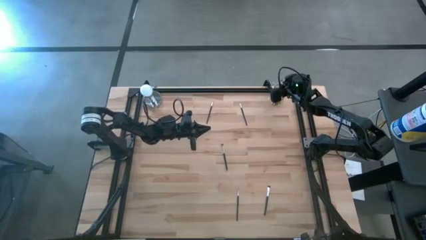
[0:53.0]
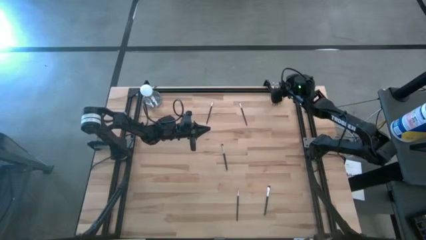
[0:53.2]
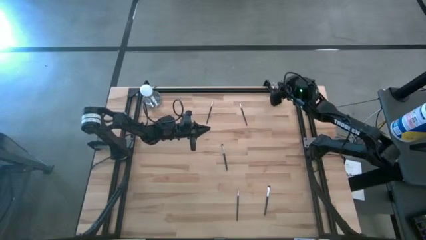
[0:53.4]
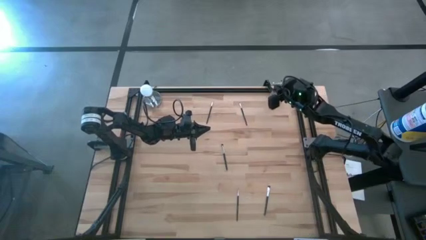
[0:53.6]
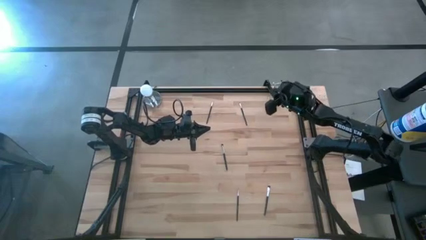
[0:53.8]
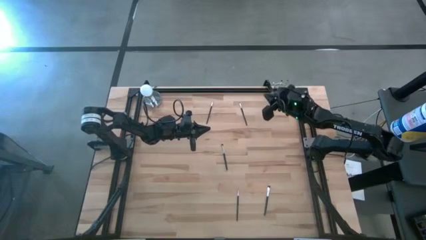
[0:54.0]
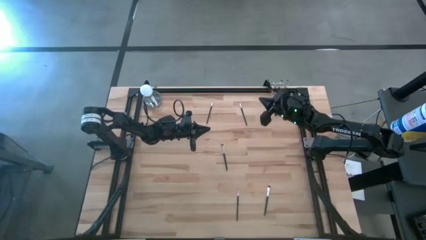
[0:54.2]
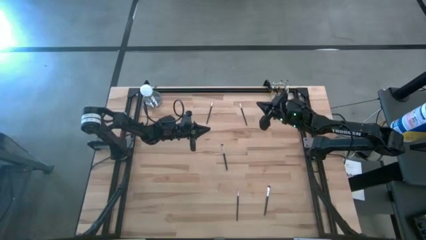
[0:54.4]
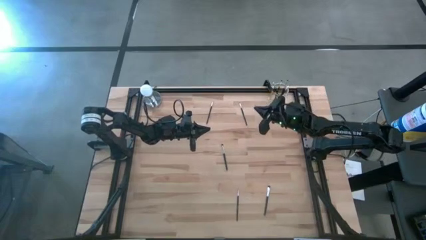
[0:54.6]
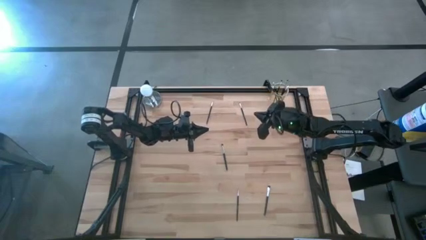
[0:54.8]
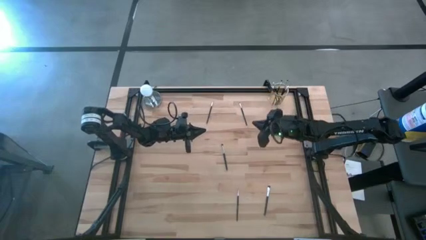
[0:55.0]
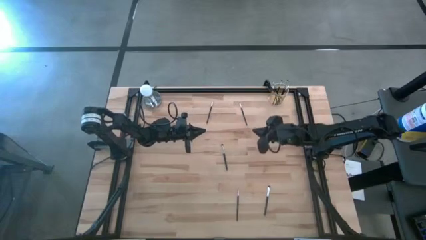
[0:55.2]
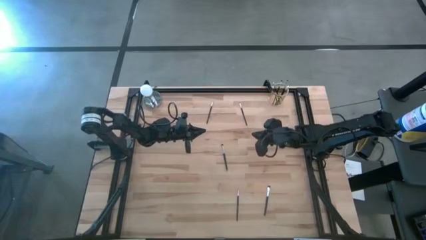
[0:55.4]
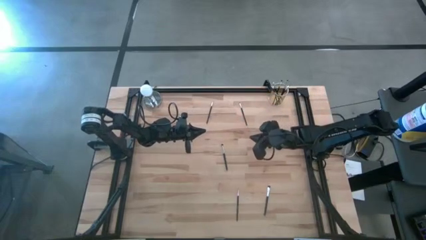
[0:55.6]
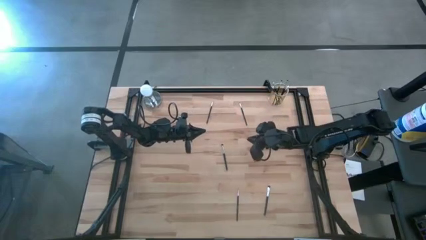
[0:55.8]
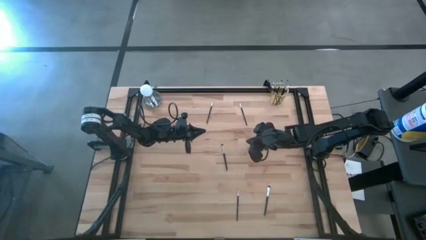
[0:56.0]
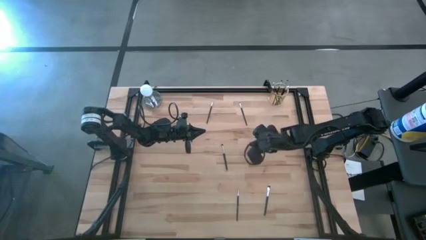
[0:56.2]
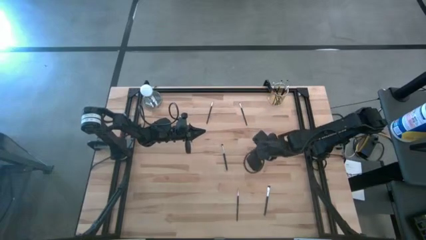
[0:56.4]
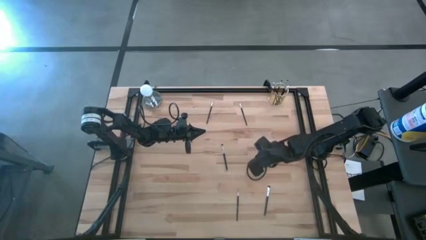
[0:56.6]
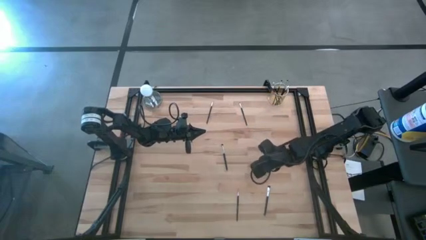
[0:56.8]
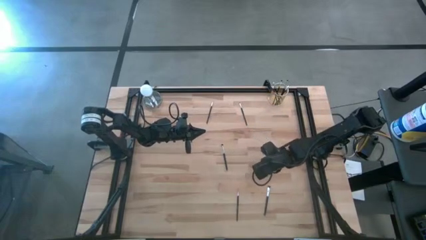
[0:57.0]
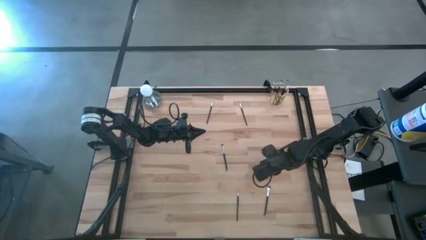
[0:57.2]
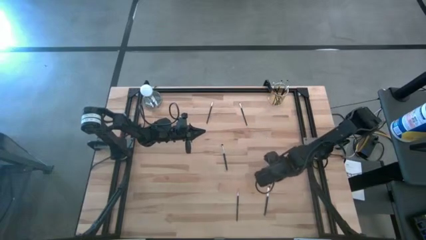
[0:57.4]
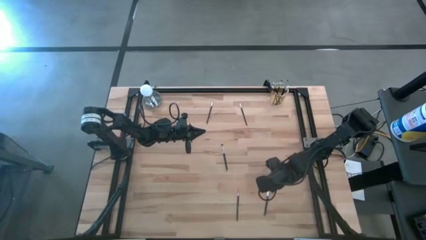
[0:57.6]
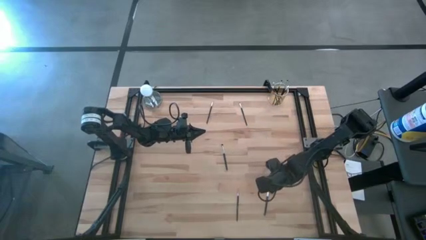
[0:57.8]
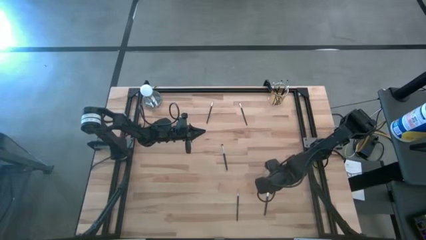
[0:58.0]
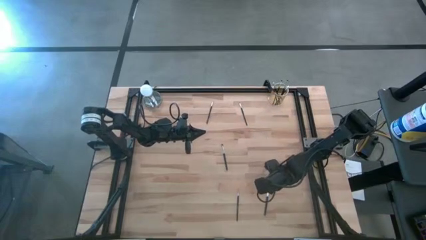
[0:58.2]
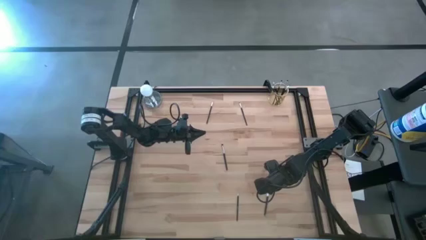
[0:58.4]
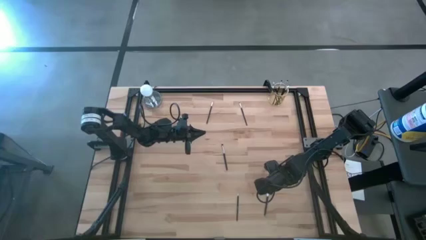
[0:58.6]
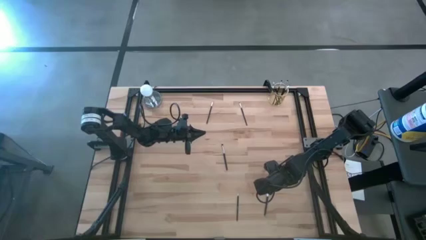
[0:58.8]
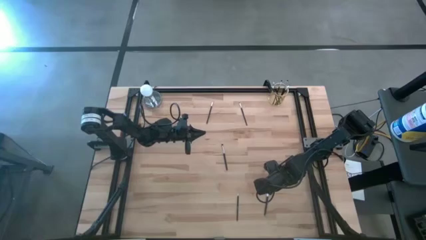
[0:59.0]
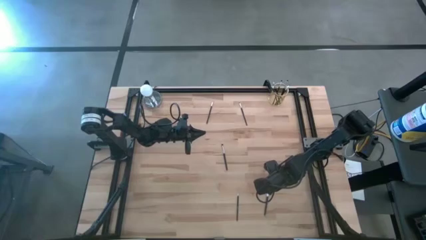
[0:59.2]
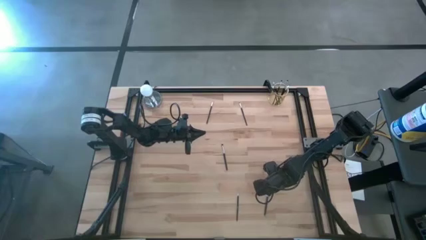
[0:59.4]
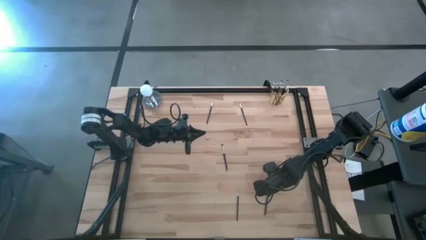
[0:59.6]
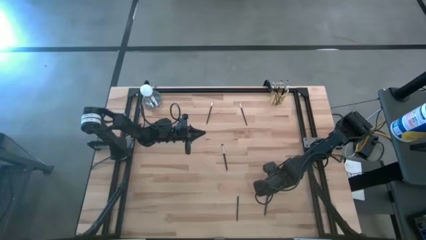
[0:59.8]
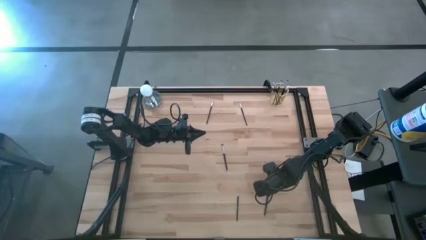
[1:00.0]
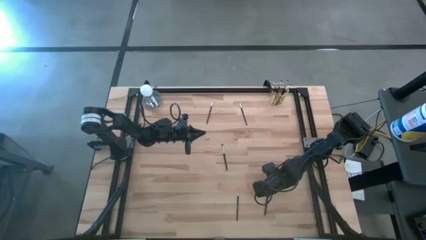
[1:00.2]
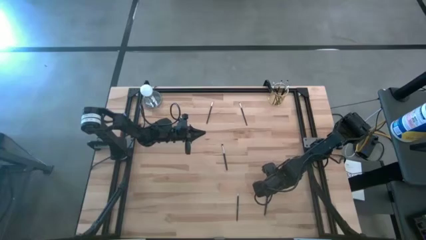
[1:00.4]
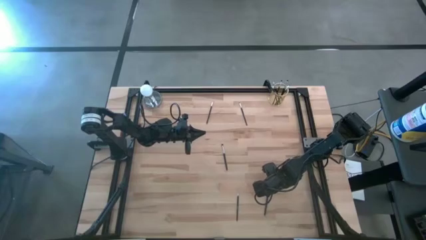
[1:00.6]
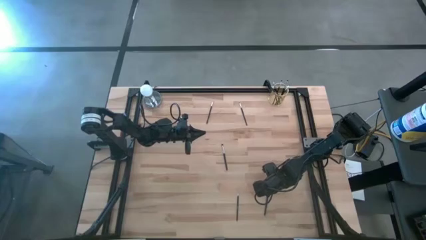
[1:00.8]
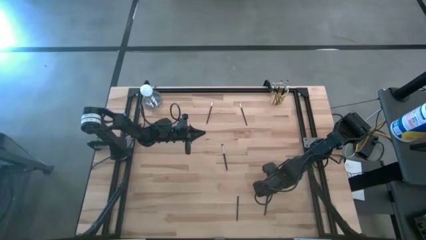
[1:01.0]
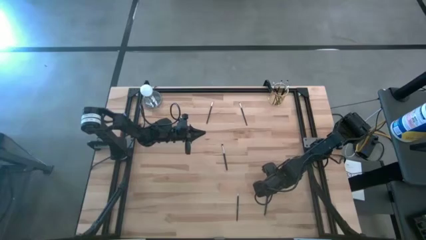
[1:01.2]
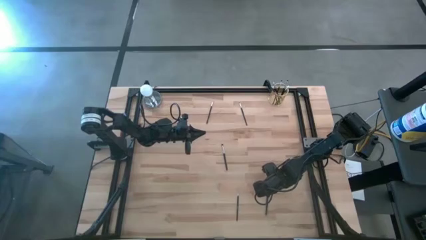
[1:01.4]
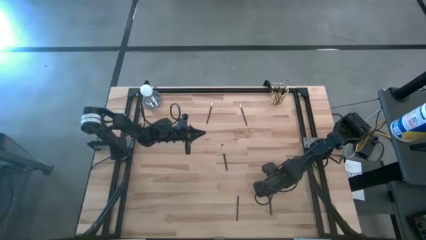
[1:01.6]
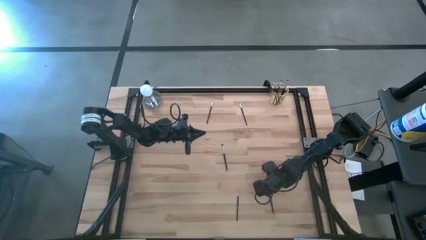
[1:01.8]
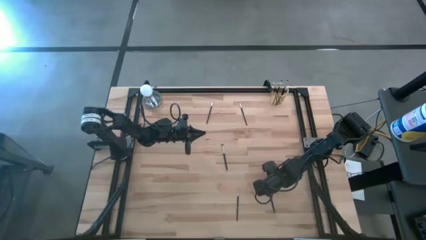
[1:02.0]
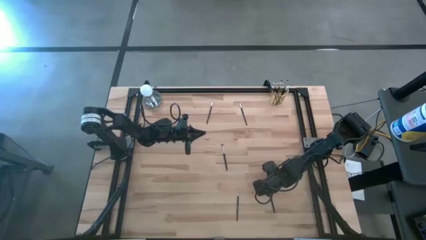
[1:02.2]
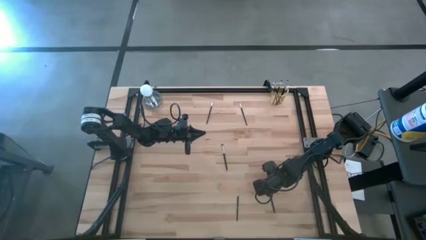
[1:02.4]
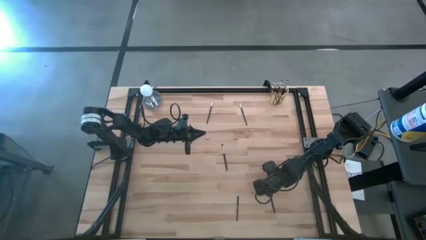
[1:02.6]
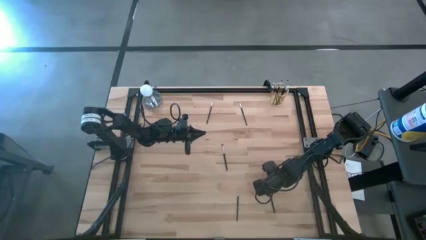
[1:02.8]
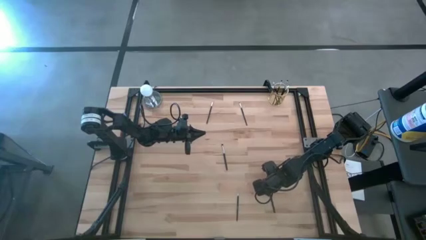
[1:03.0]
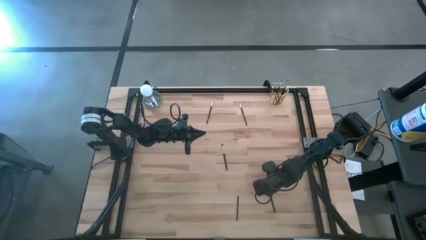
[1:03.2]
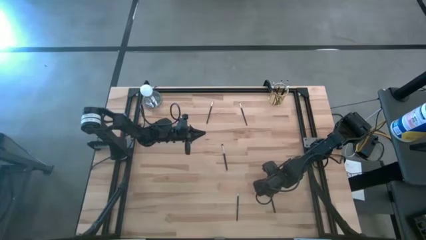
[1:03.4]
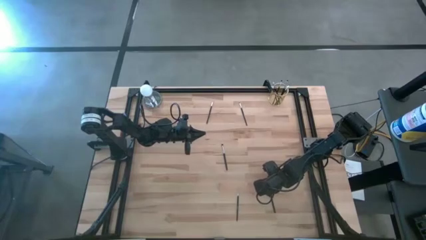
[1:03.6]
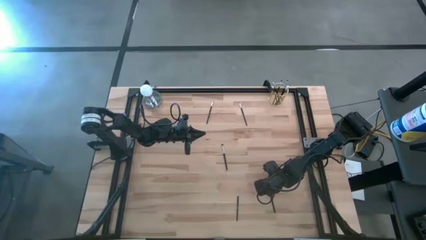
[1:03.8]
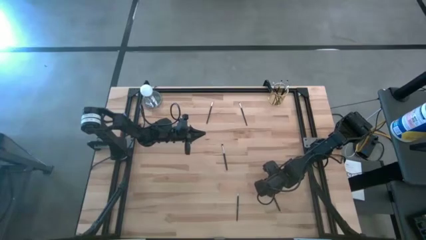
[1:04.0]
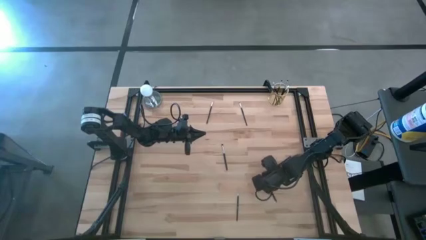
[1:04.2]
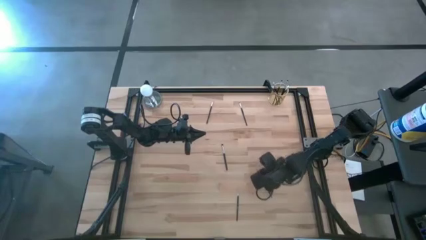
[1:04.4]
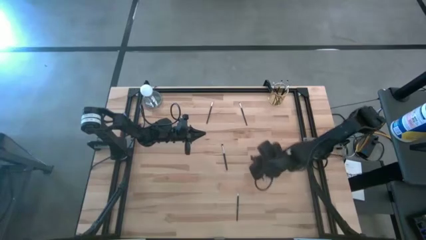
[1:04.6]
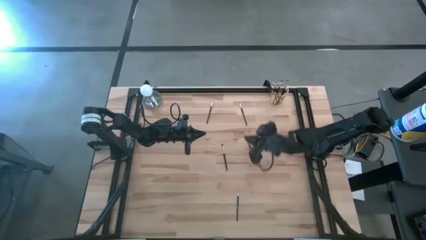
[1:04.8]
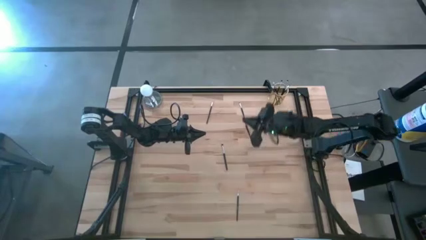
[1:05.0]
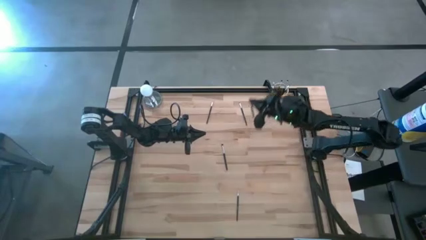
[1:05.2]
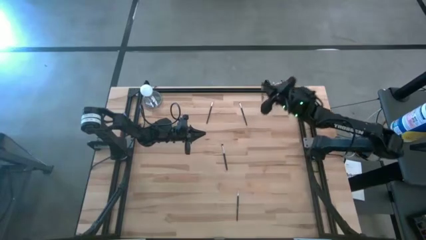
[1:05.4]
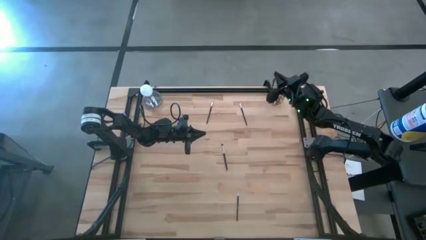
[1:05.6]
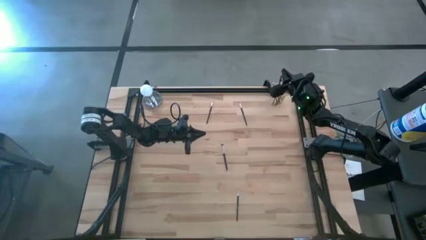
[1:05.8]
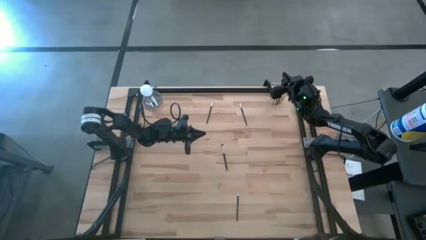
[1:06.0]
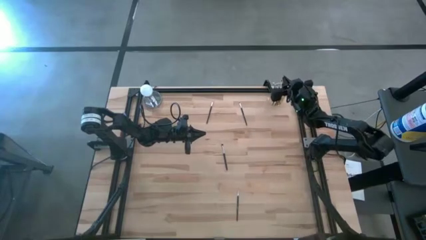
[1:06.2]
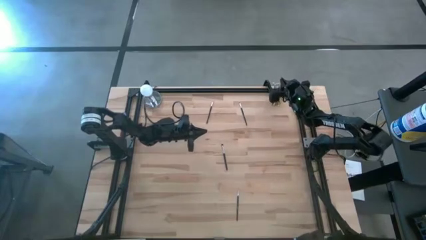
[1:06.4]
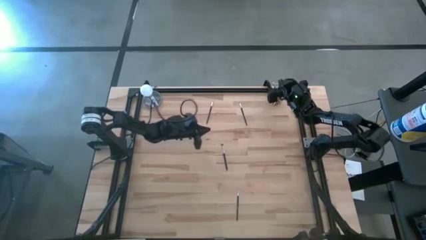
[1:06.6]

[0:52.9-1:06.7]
Task: Sort items
Put the black eyeshadow brush into the gold holder

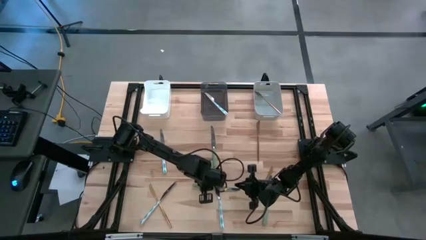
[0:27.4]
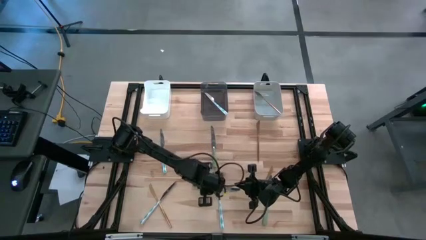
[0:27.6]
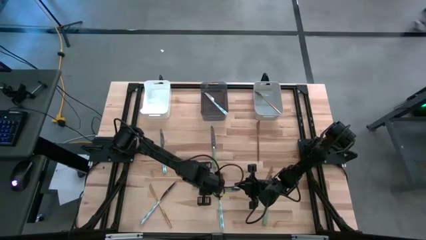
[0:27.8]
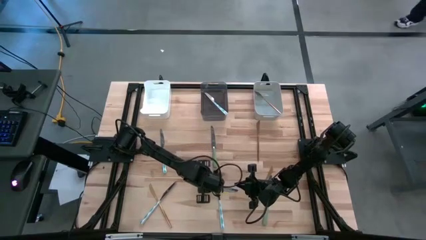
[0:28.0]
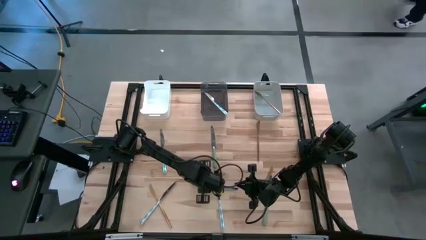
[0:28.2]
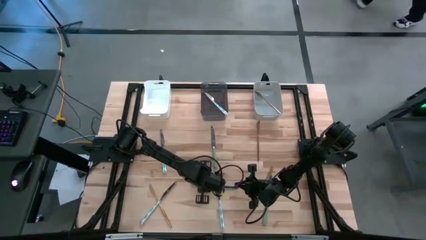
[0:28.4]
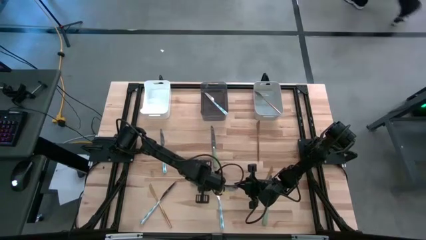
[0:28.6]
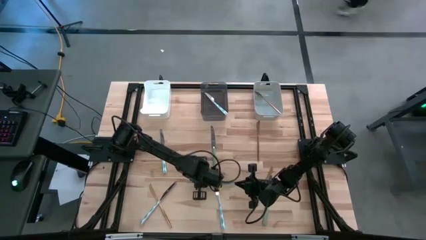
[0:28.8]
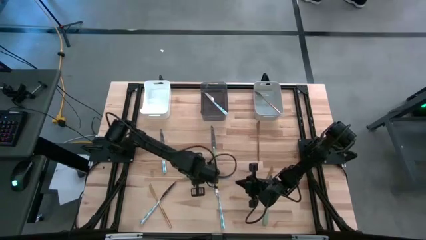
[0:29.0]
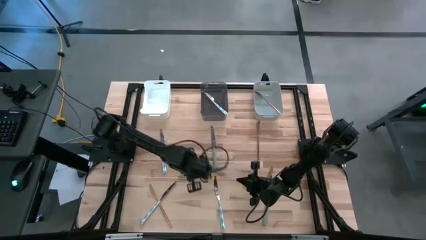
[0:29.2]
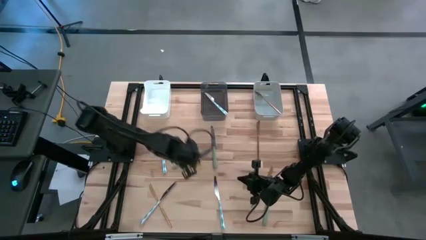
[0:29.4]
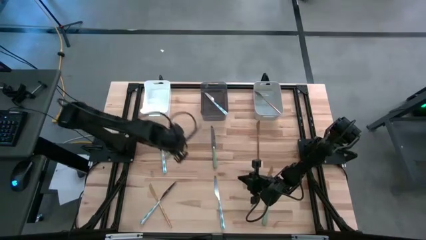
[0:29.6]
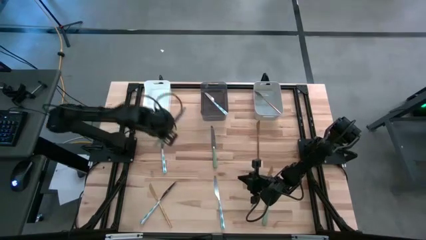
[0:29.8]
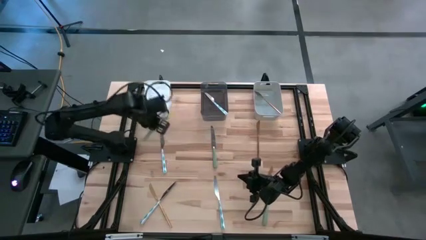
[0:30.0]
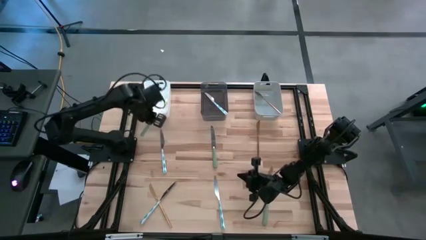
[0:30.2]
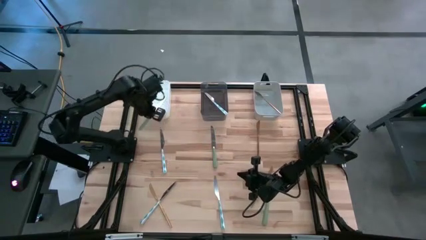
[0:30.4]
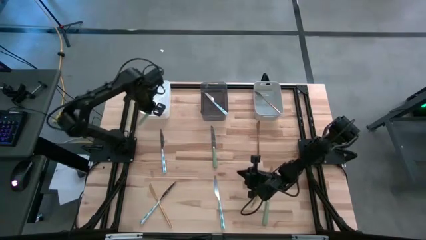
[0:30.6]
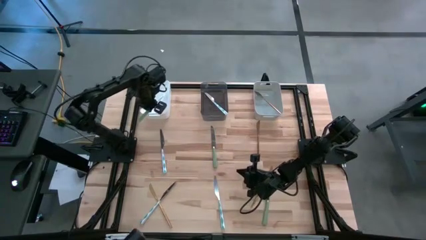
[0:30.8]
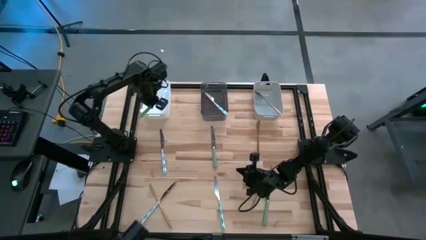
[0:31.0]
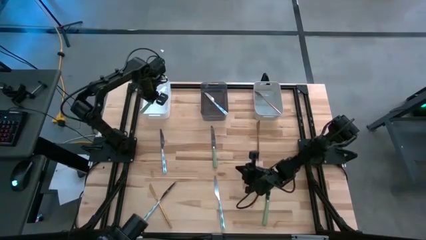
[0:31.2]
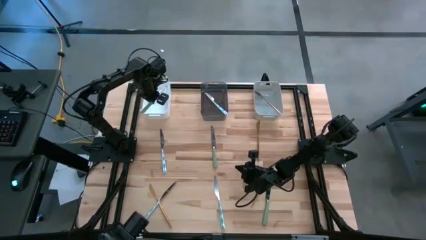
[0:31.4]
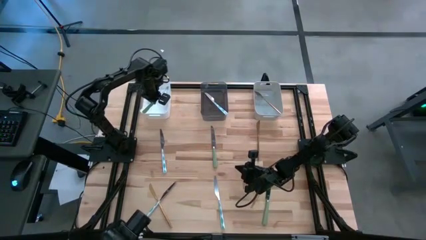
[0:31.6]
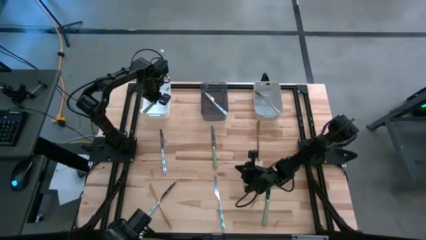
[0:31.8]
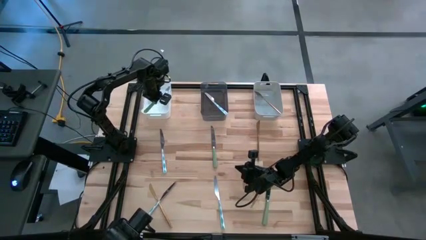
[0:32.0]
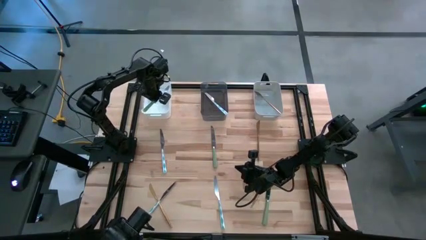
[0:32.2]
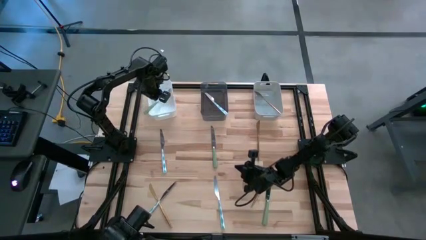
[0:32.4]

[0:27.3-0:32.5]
Task: Sort silverware by color (type)
Put the bottom left green table knife into the white bin
